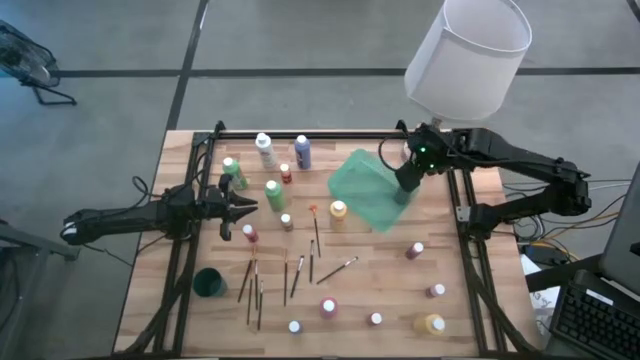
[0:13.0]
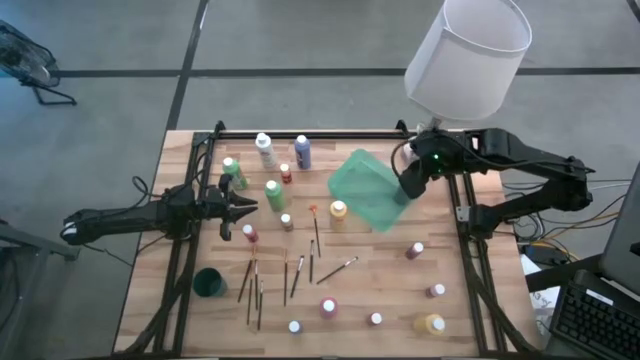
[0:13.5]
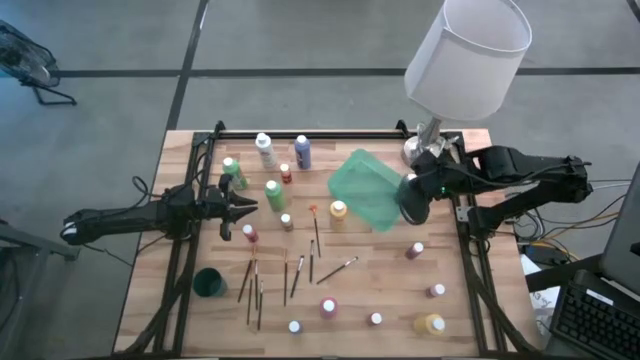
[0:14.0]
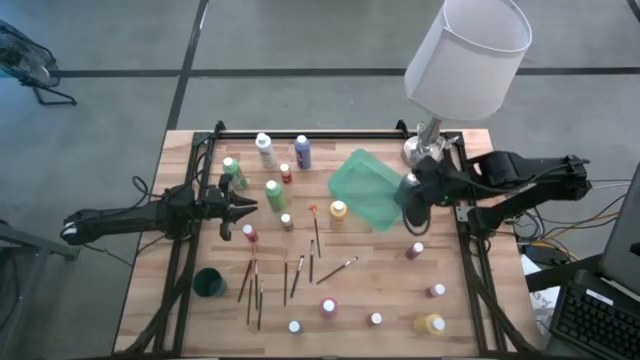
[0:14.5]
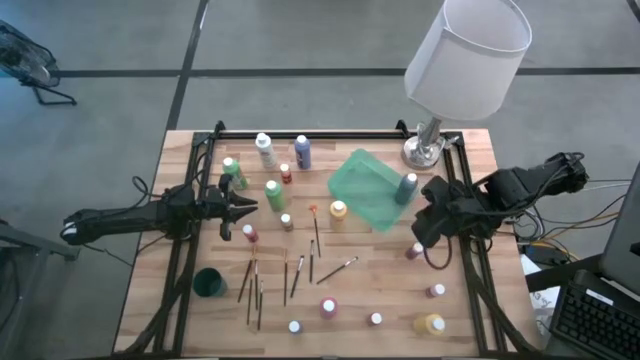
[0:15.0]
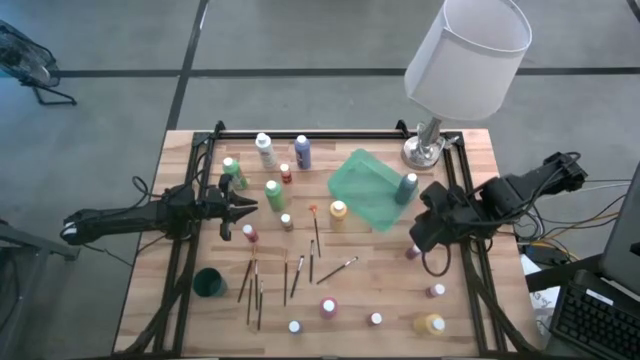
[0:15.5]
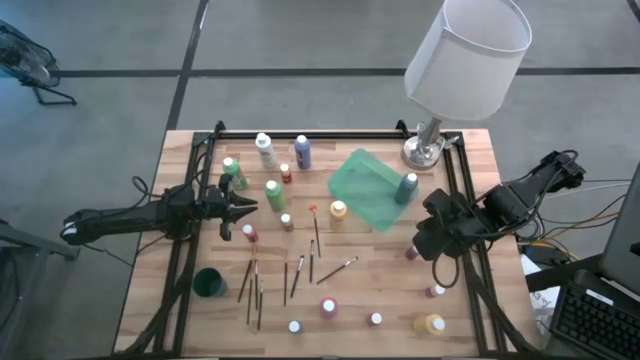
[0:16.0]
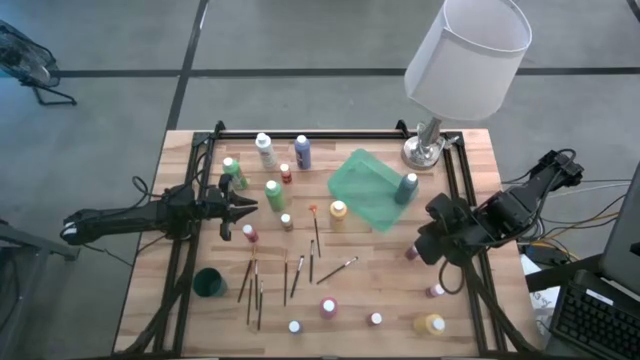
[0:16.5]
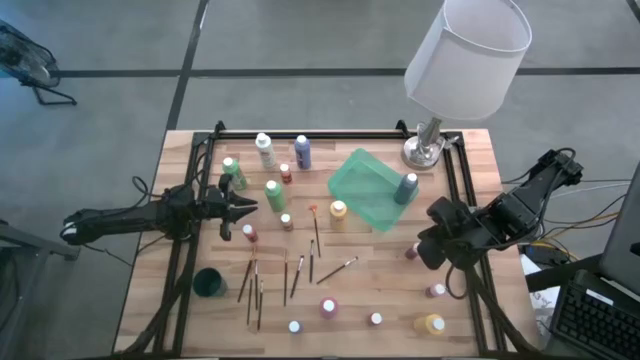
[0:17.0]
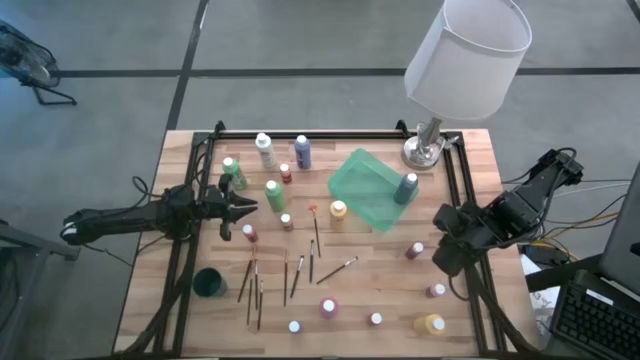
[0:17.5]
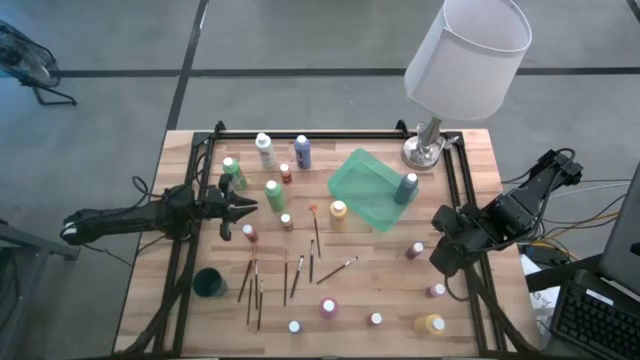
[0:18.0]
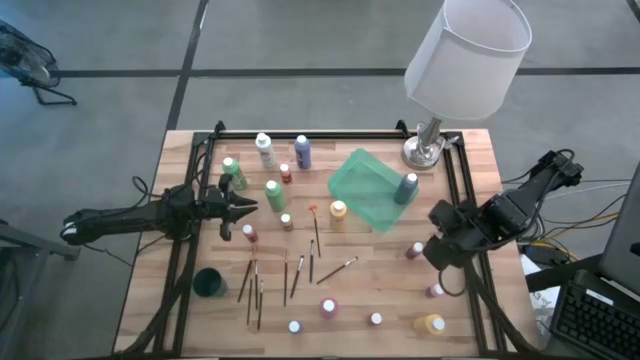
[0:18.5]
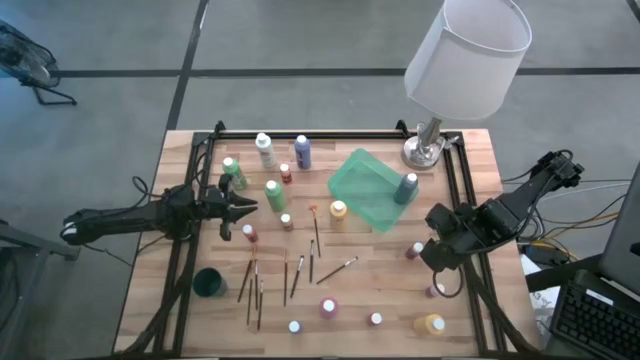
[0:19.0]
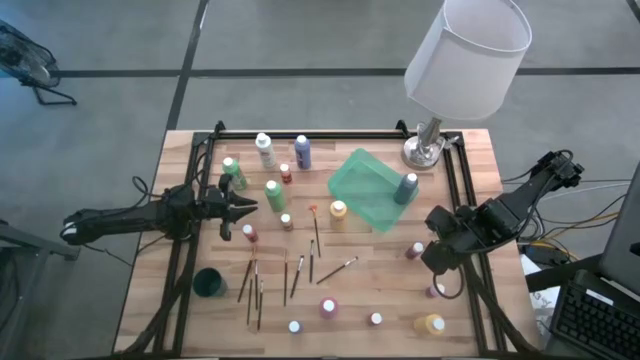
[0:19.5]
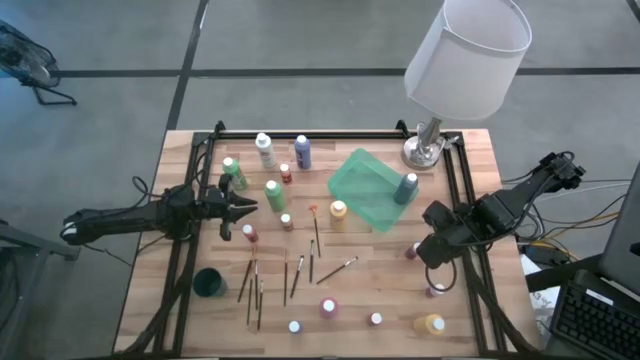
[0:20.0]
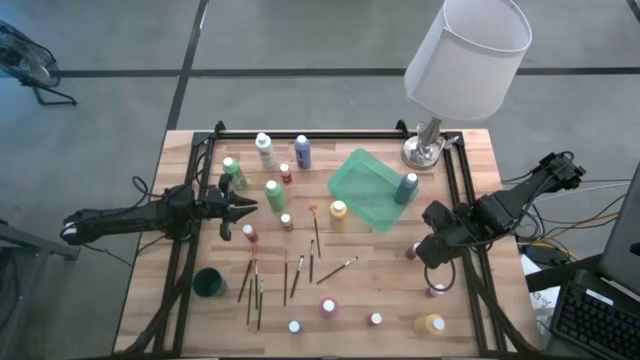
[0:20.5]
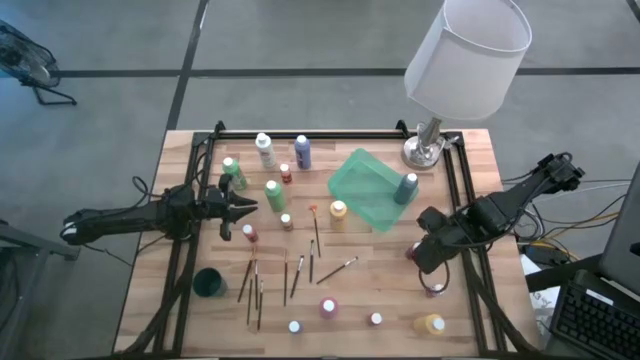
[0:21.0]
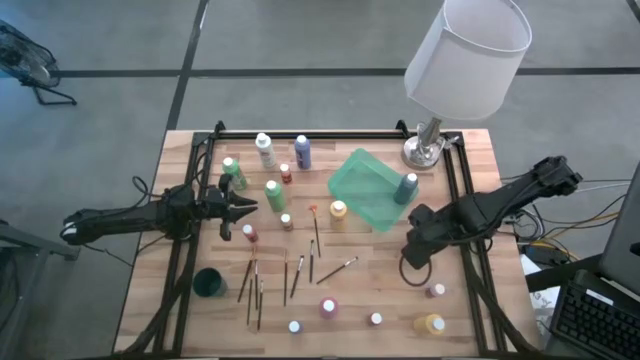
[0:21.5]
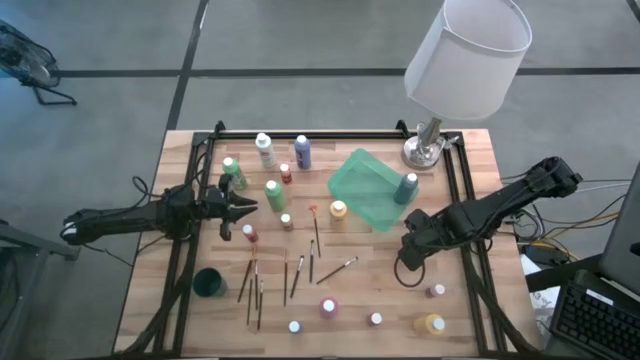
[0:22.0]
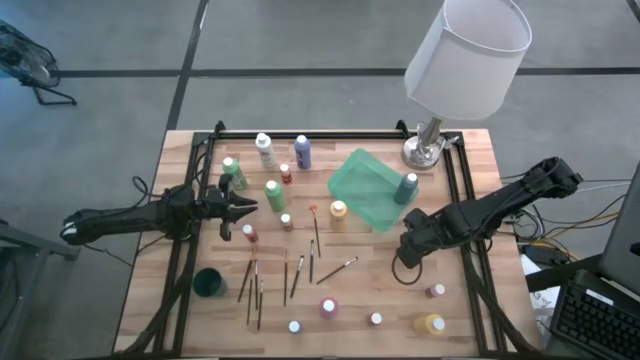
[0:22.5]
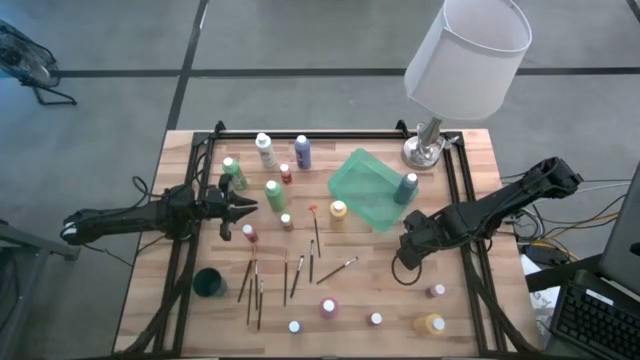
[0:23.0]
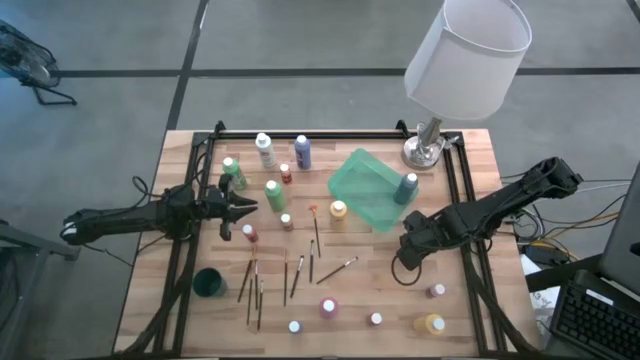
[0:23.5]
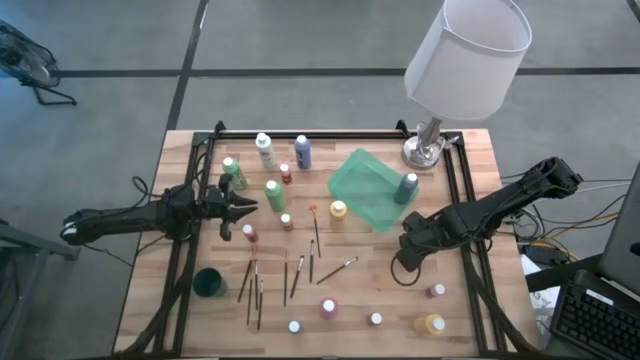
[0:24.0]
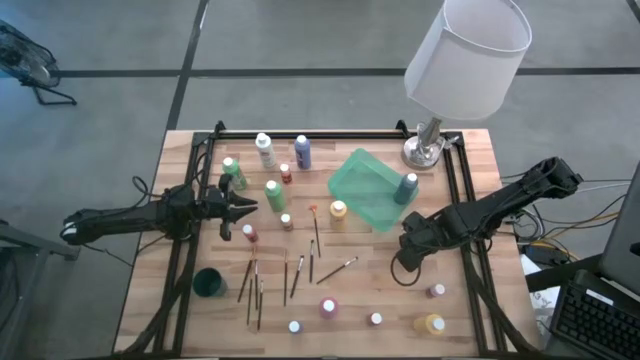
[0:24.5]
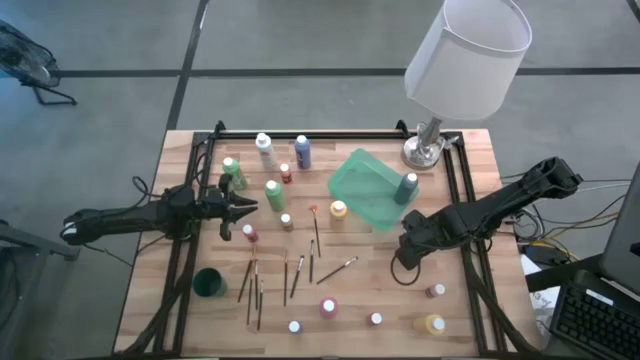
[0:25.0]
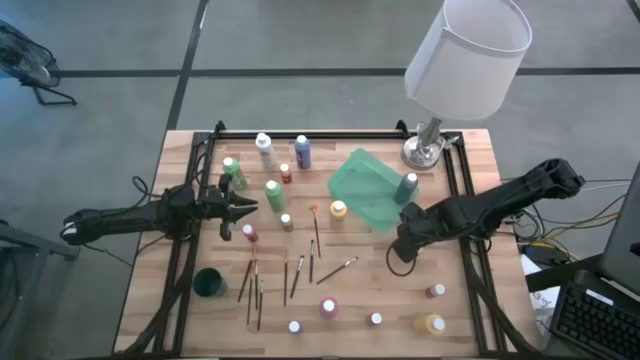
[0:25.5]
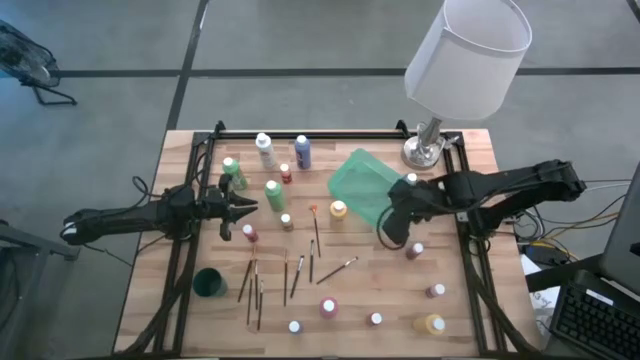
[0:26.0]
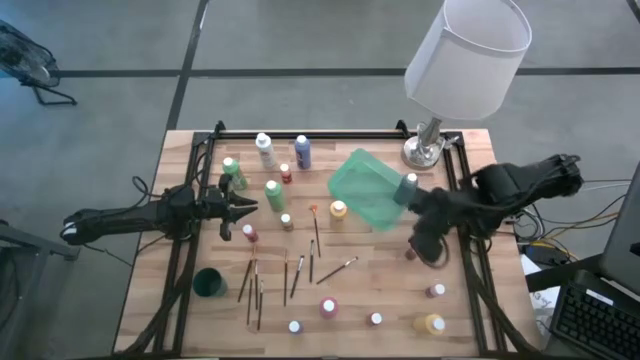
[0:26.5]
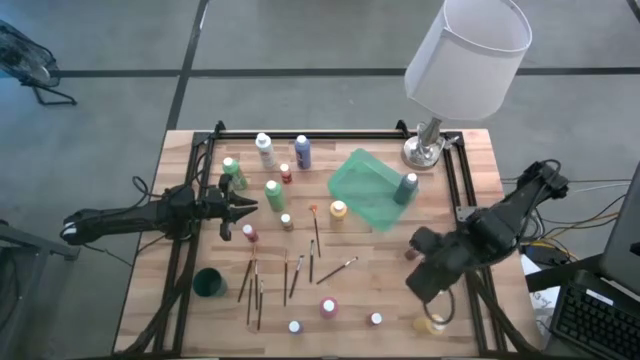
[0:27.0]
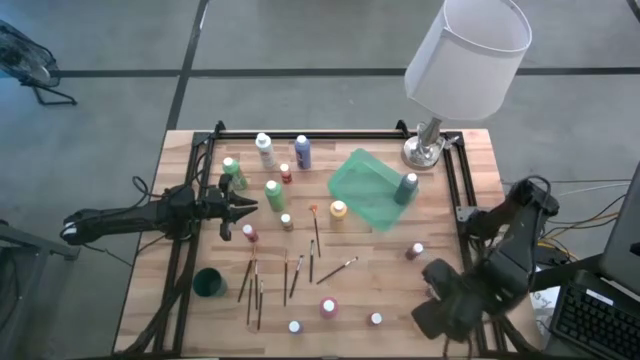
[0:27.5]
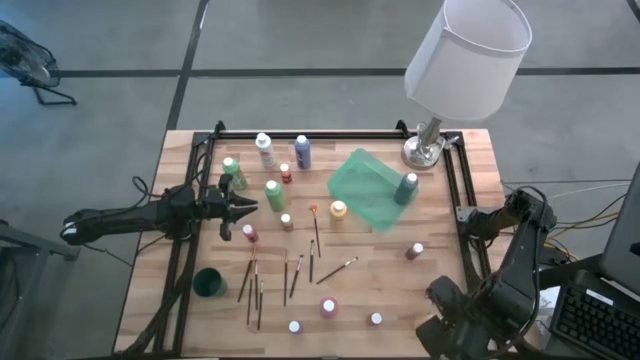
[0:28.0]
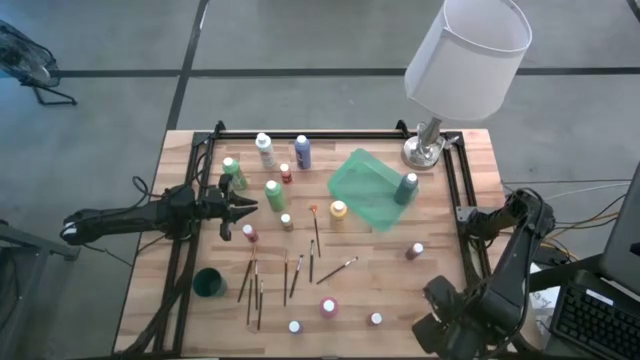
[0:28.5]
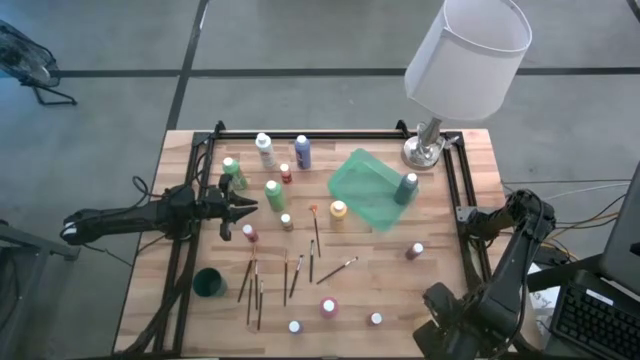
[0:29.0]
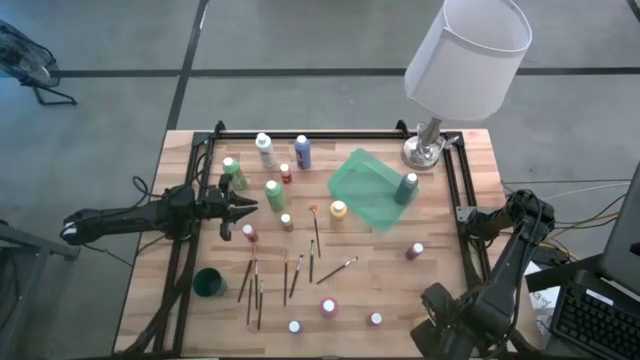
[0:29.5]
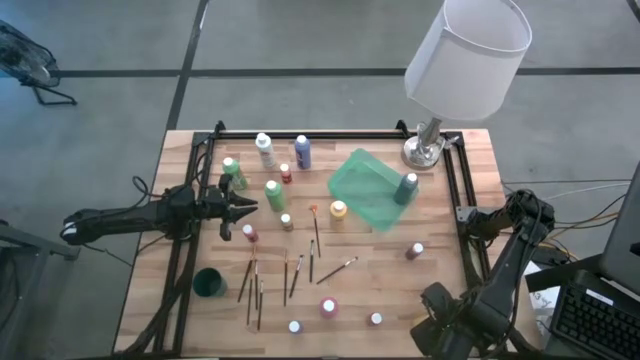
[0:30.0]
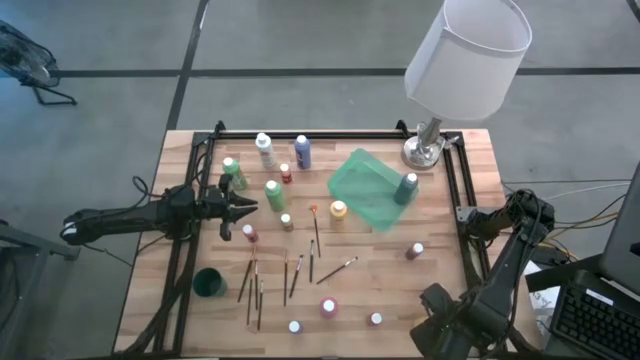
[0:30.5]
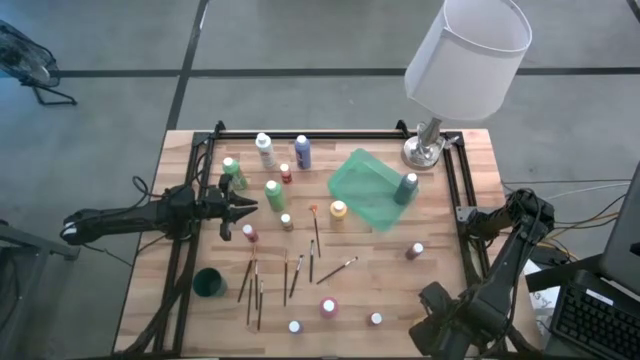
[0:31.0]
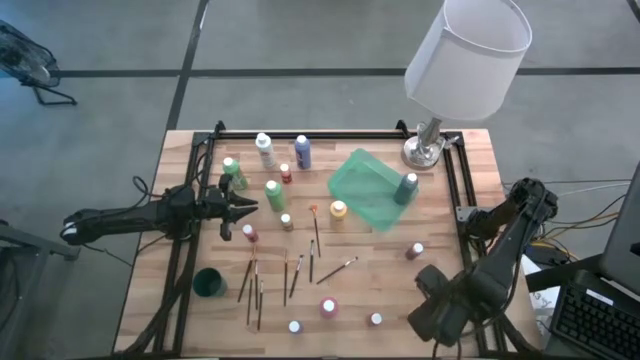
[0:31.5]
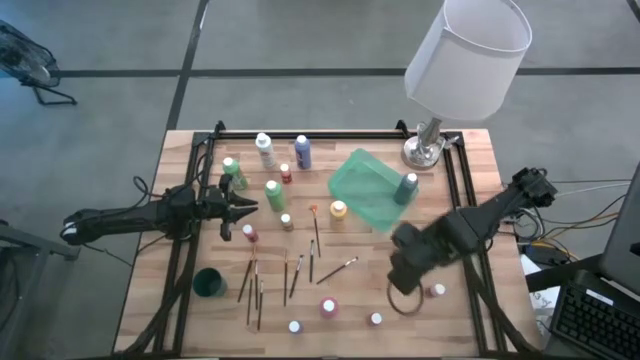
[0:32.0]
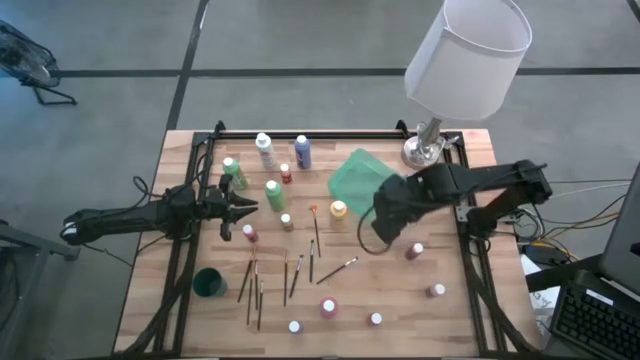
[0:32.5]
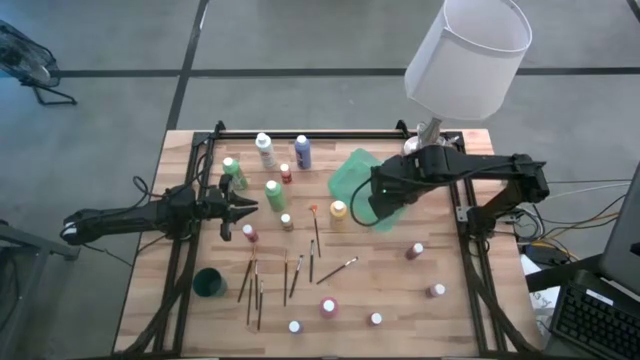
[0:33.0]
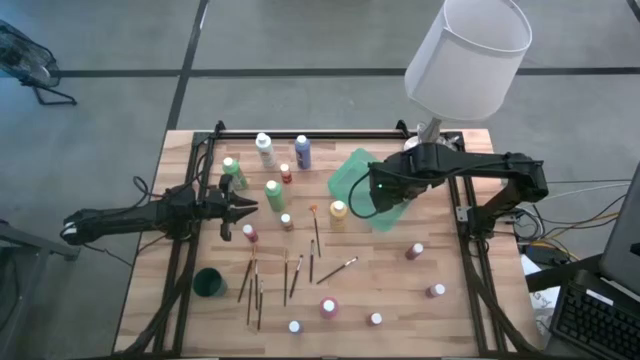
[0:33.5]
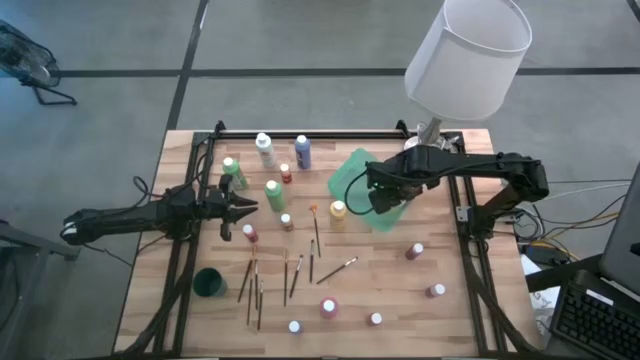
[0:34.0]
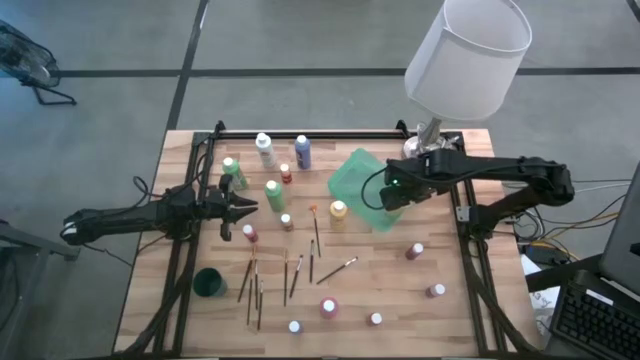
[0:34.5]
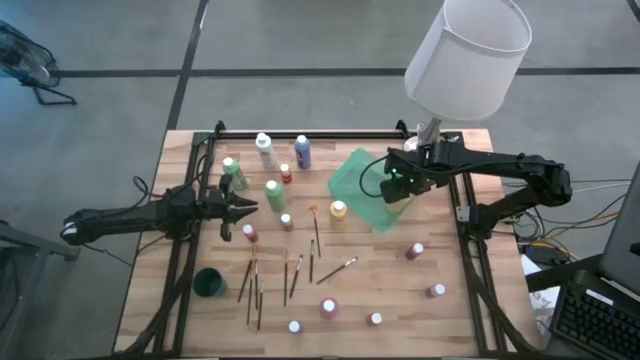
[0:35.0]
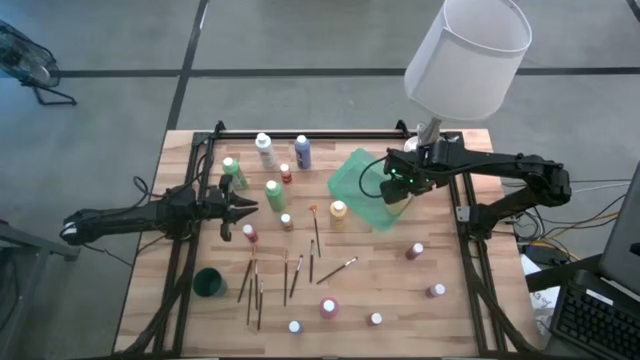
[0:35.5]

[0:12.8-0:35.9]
Task: Pick & Place Paint Supplies
Put the big yellow paint bottle into the green bin
